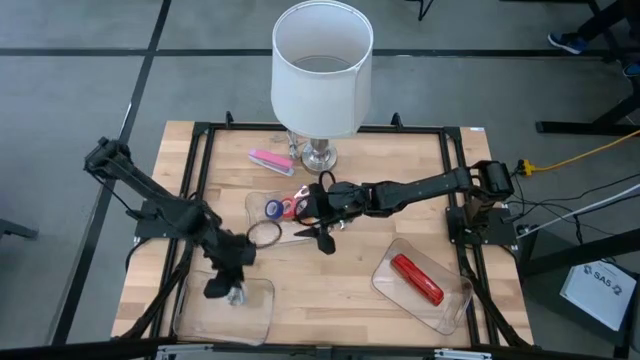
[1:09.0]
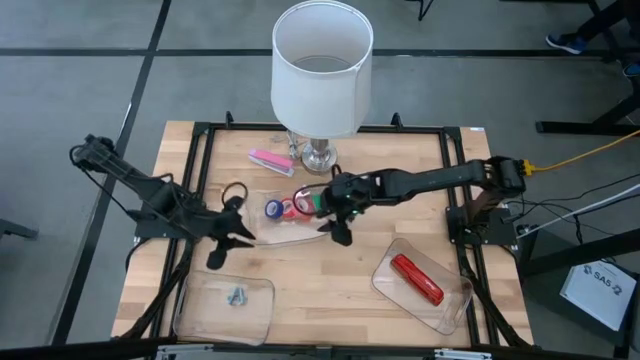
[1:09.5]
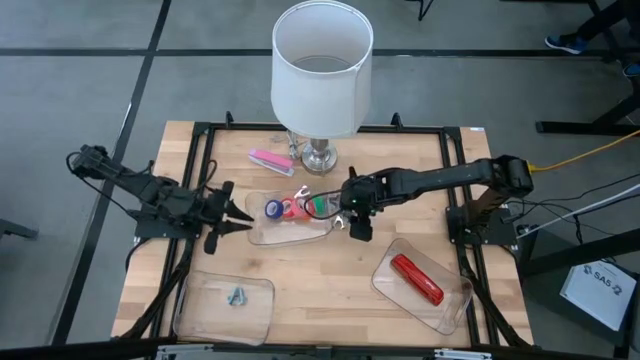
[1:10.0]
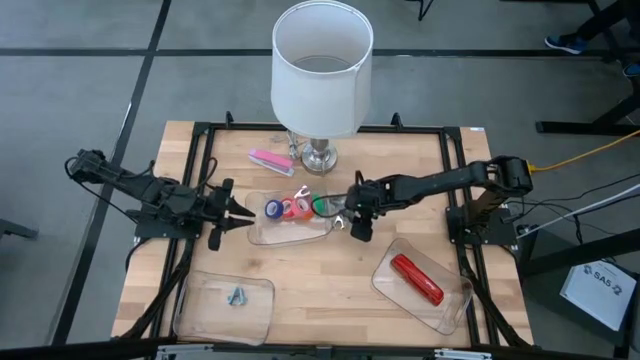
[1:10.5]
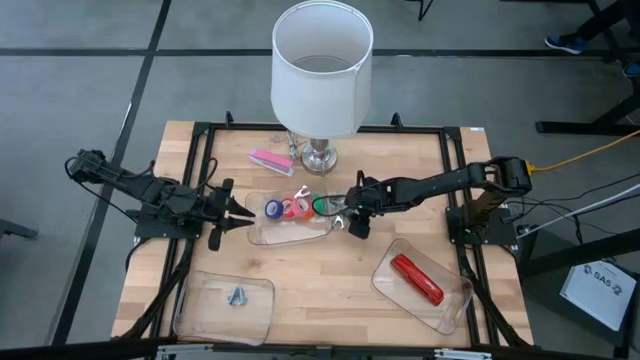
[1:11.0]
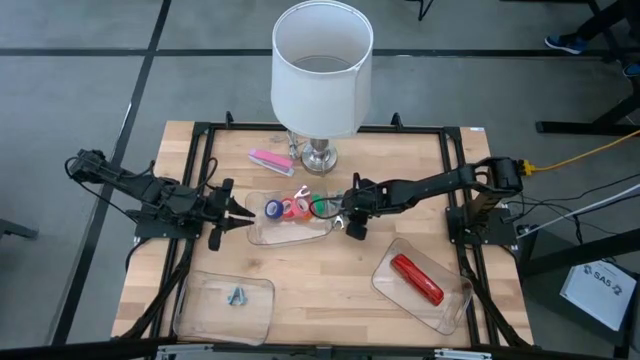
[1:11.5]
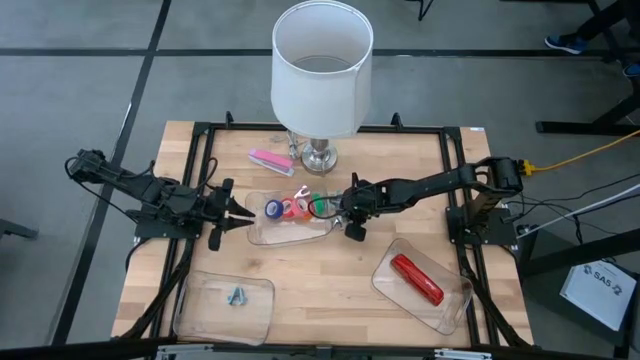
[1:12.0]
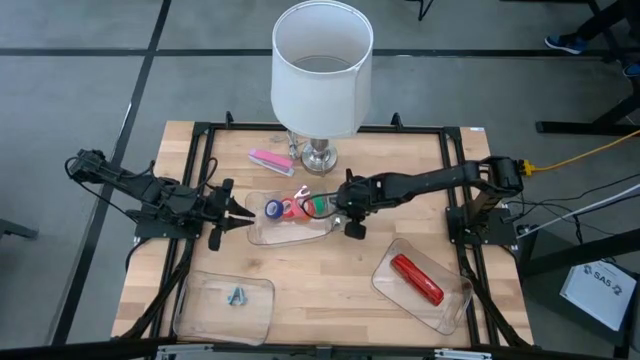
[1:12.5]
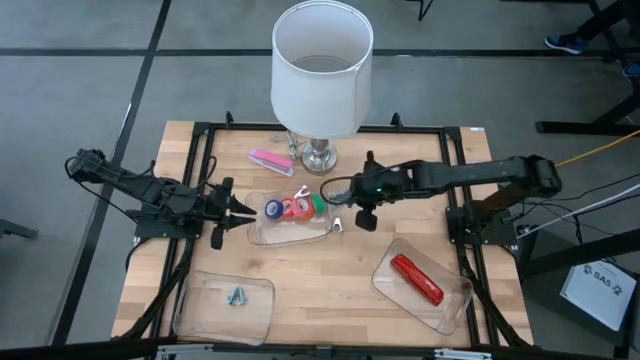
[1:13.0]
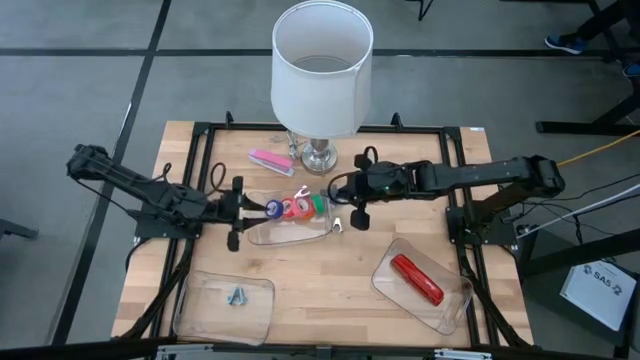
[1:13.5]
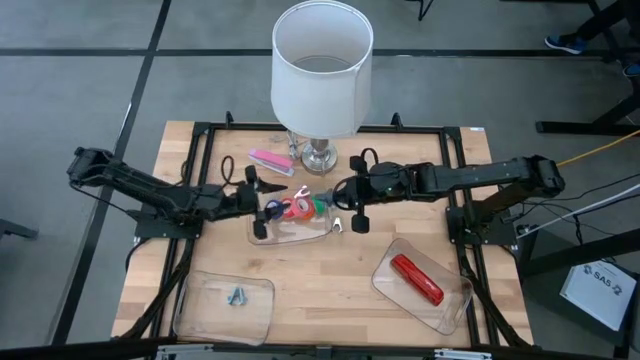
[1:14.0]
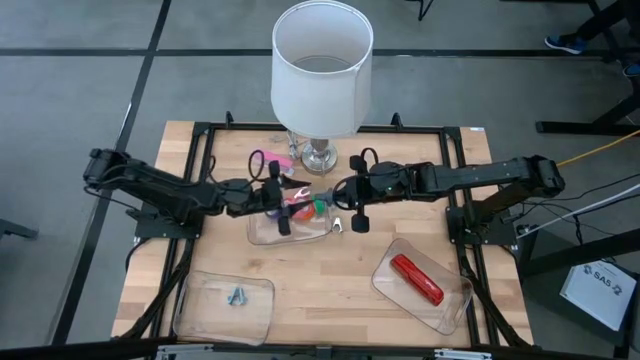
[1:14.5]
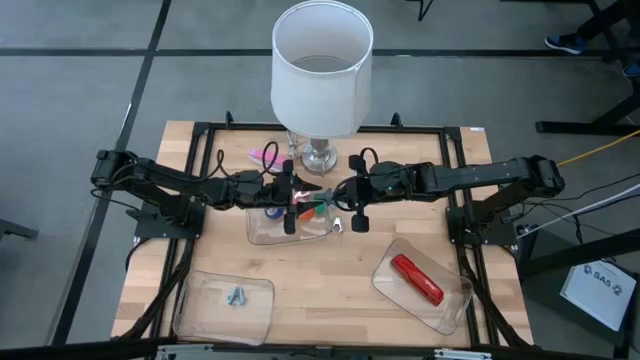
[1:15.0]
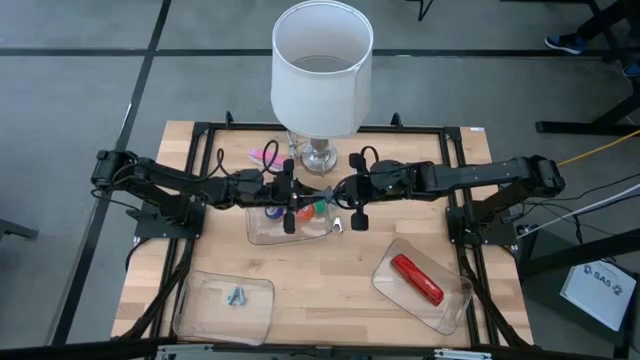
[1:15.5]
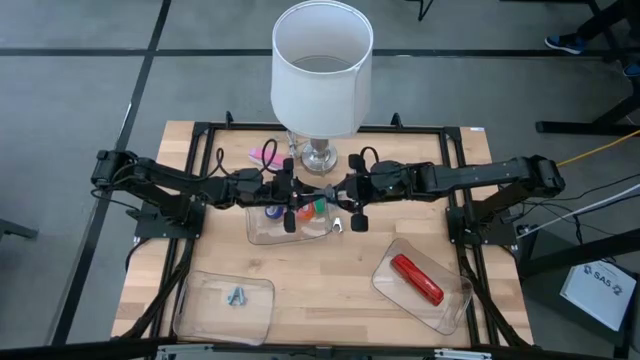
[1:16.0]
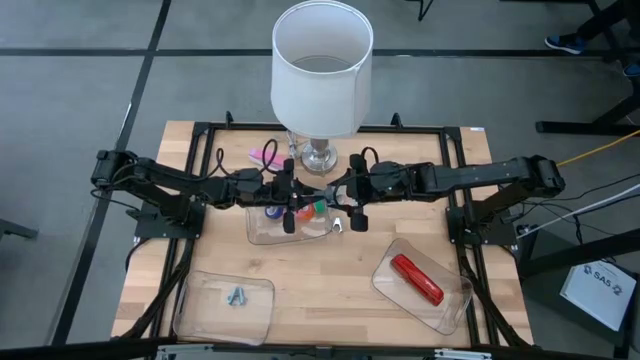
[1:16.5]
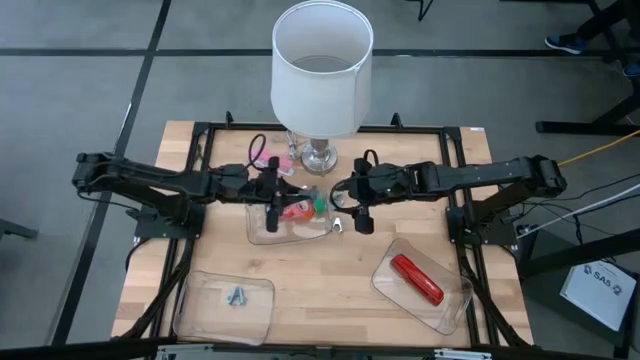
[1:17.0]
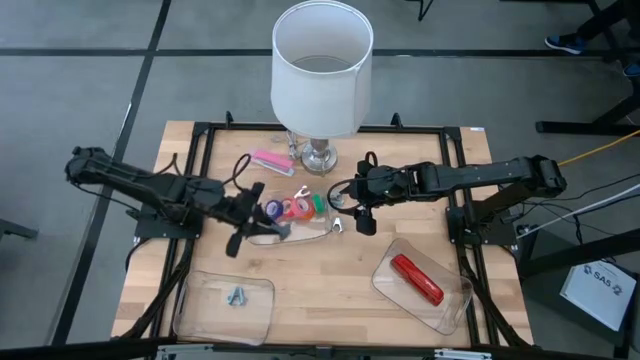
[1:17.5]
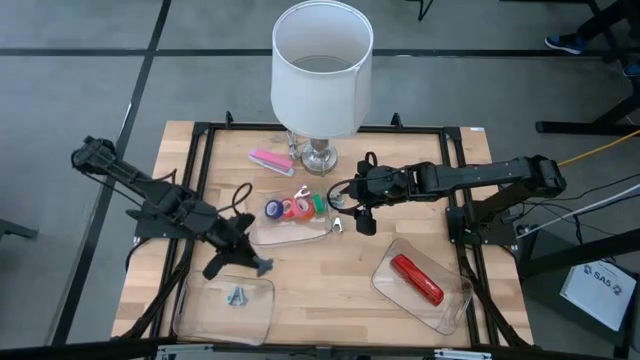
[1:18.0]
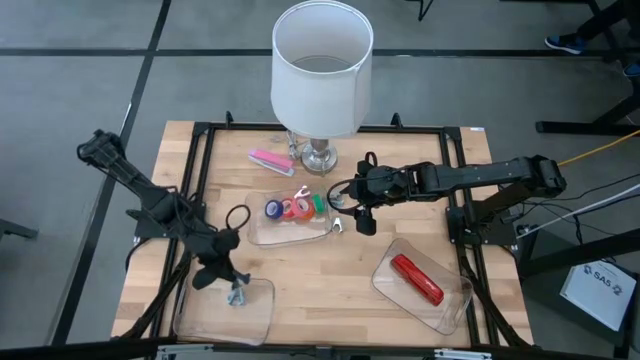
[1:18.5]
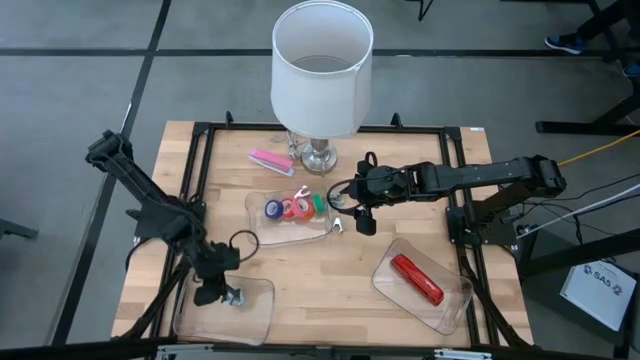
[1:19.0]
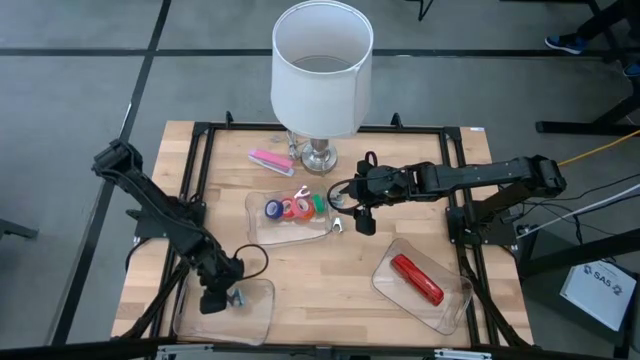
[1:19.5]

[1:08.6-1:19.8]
Task: Pick and place Stapler, Stapler remover, tape
Put the black staple remover into the bottom left transparent bin

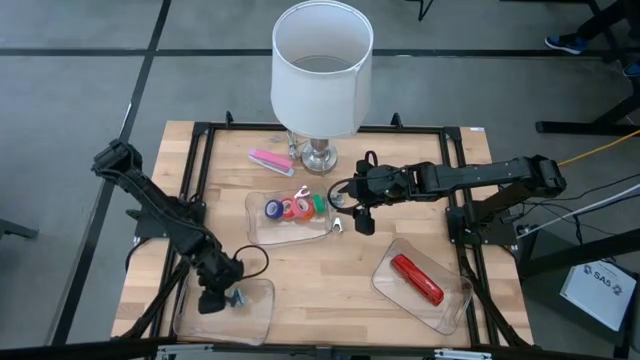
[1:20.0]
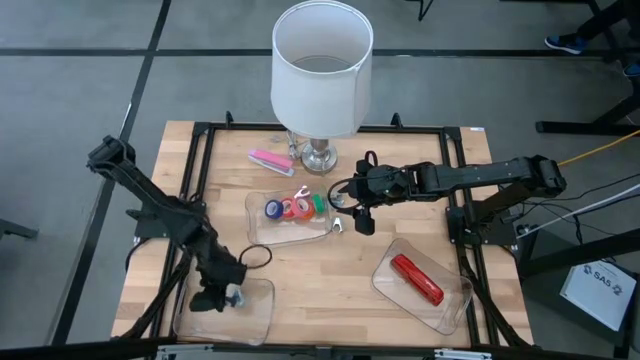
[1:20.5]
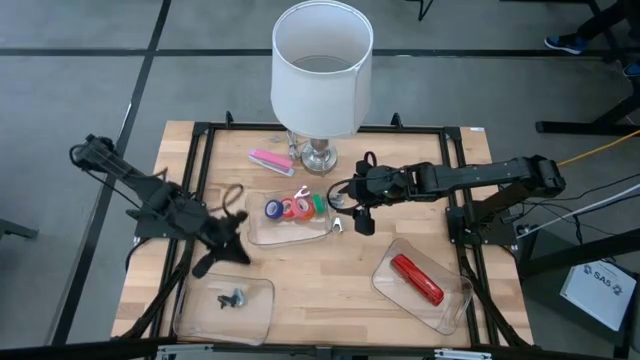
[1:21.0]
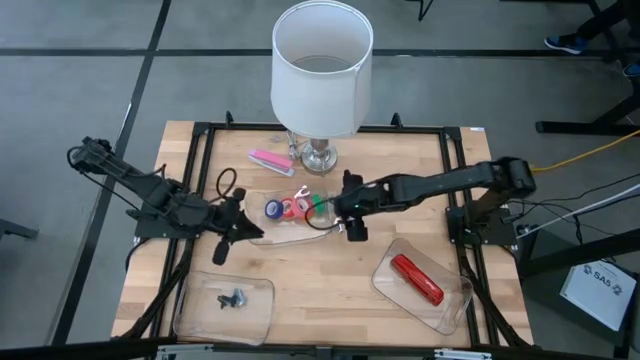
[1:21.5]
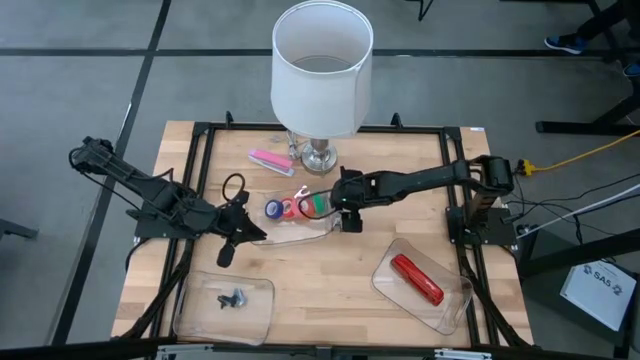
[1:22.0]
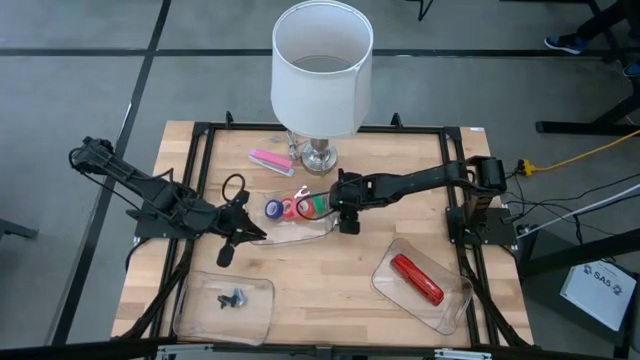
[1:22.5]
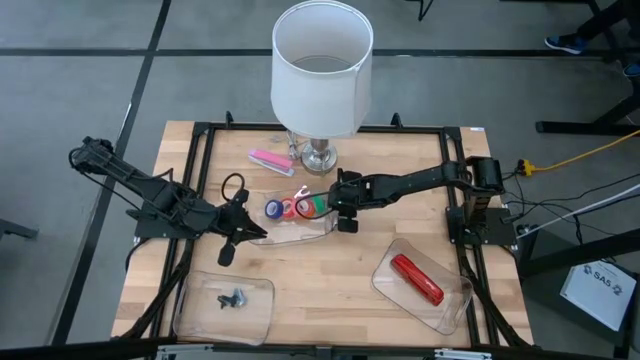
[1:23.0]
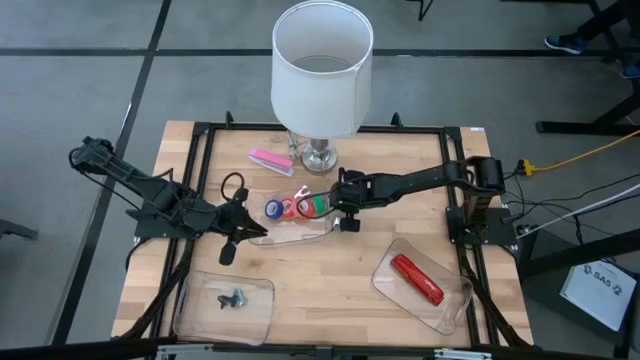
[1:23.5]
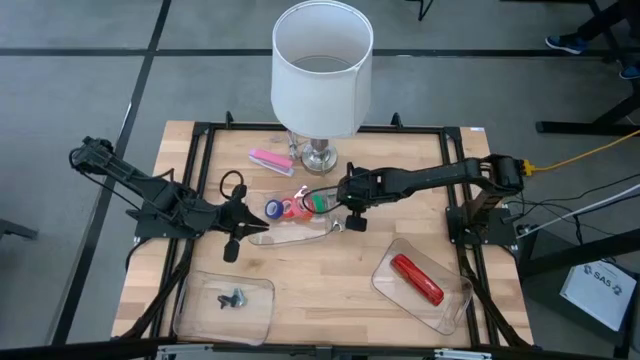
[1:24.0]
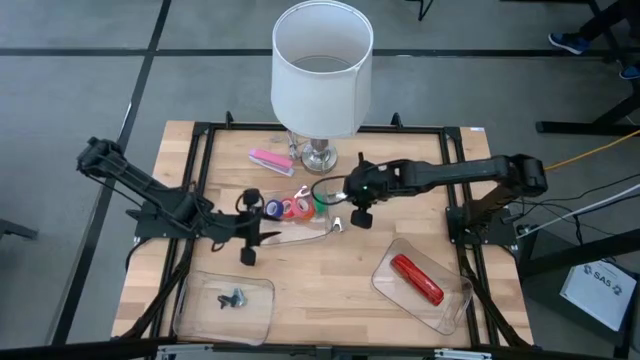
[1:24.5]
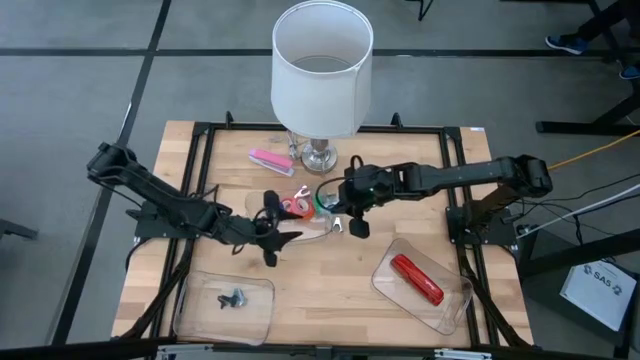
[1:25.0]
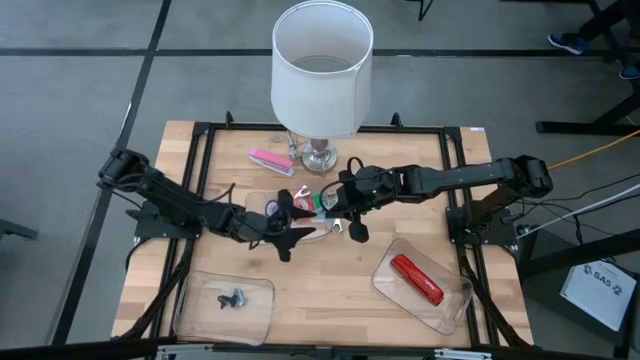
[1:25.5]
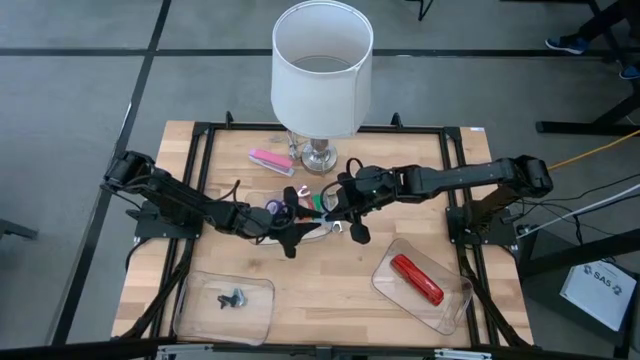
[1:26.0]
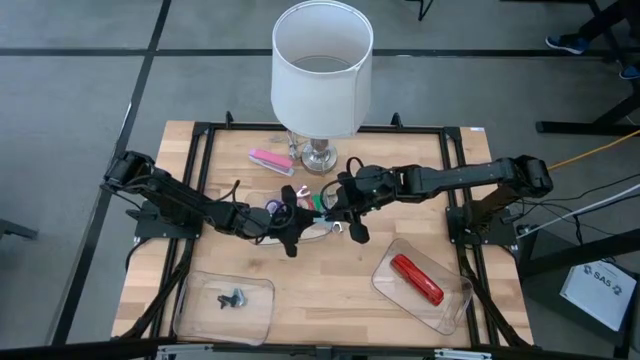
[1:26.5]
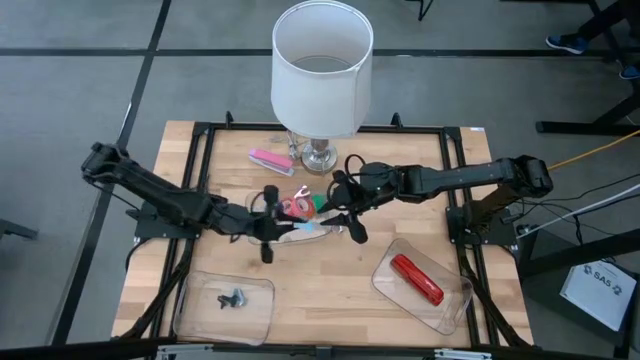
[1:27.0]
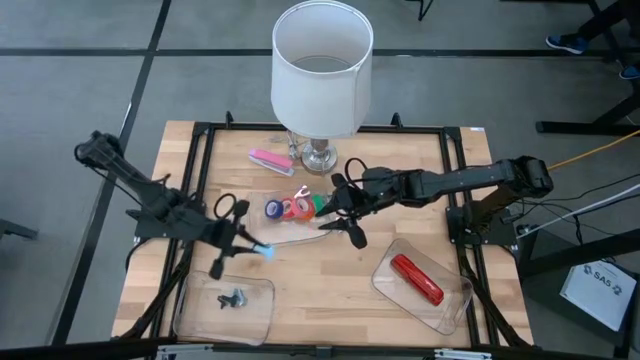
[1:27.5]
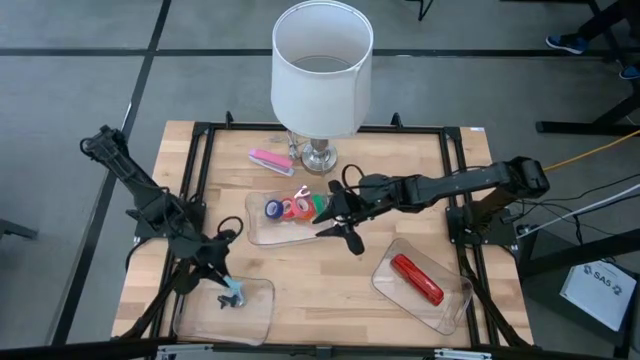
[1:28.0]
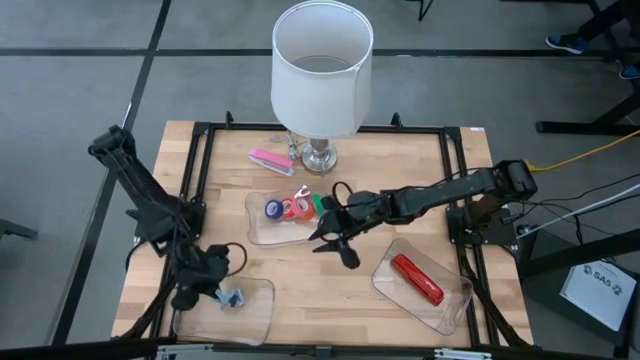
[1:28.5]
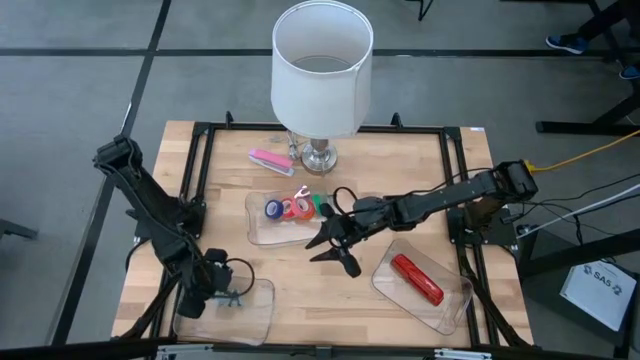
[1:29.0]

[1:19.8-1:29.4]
Put the blue staple remover into the bottom left transparent bin

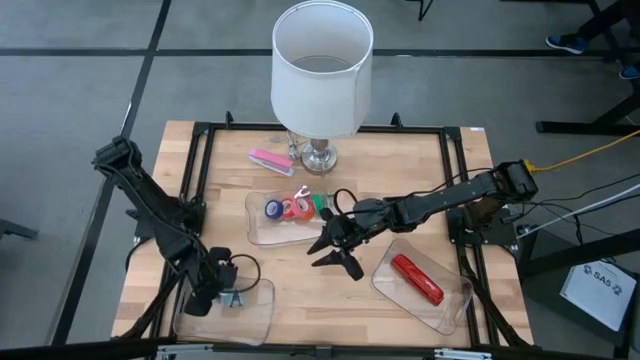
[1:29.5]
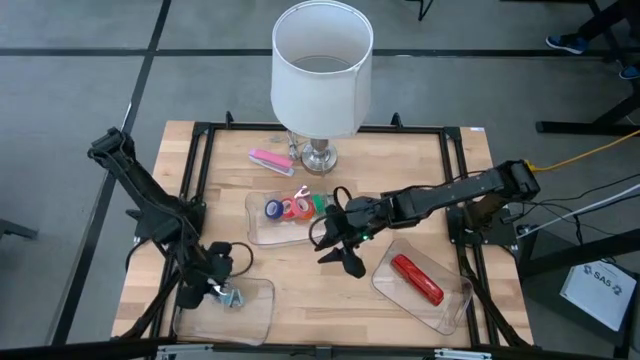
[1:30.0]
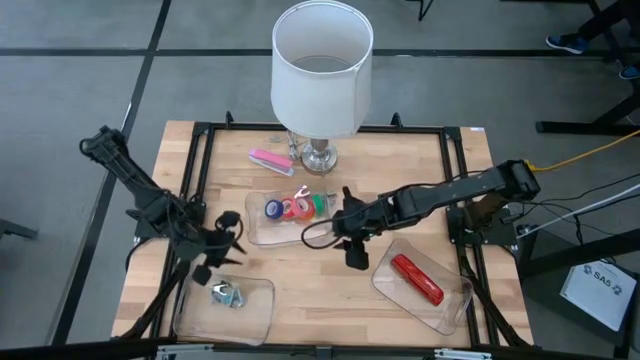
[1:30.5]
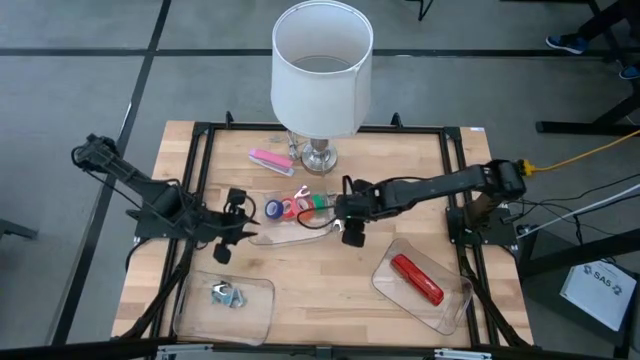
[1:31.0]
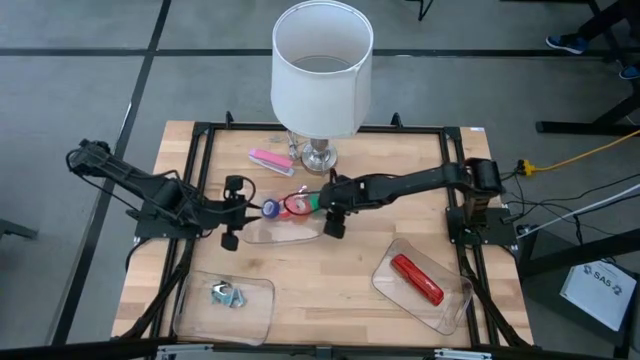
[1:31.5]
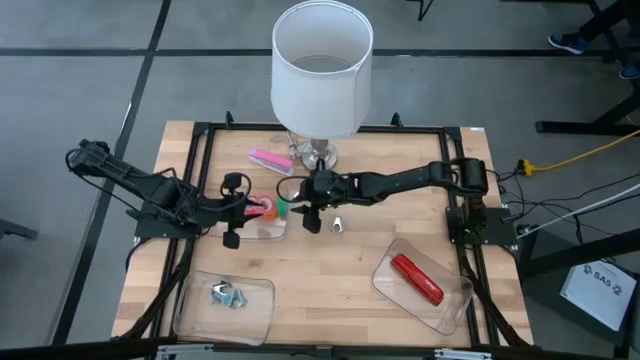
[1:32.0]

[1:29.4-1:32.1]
Adjust the top transparent bin
